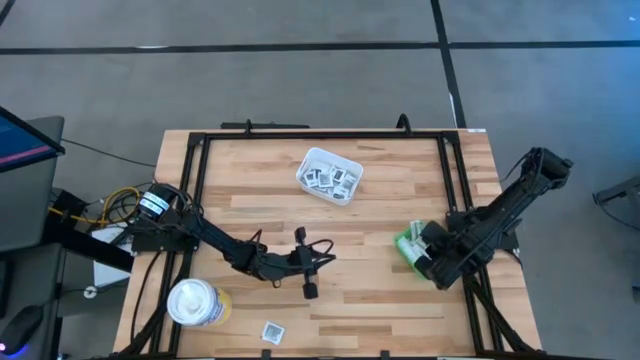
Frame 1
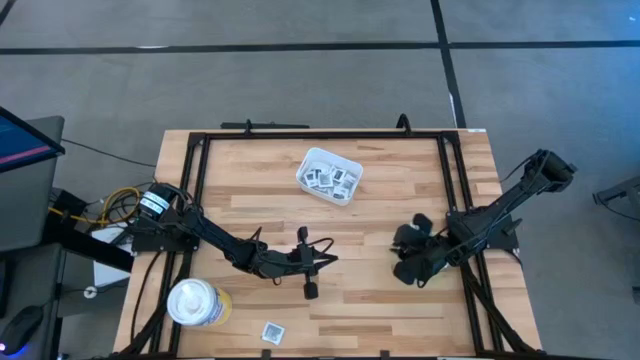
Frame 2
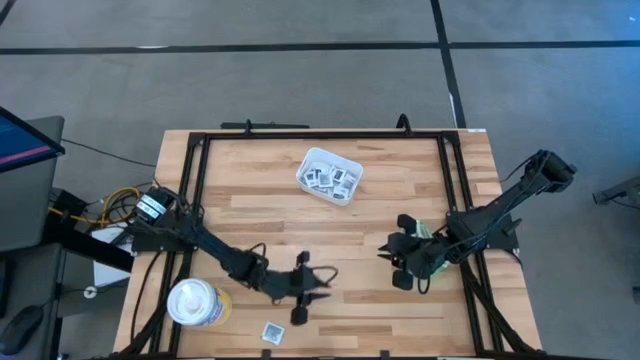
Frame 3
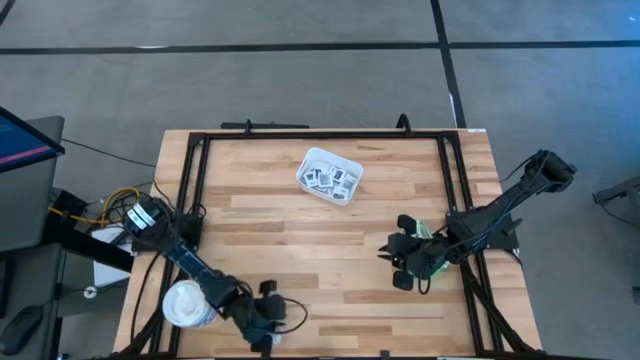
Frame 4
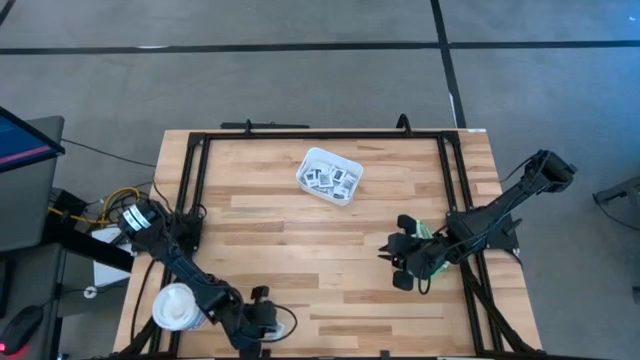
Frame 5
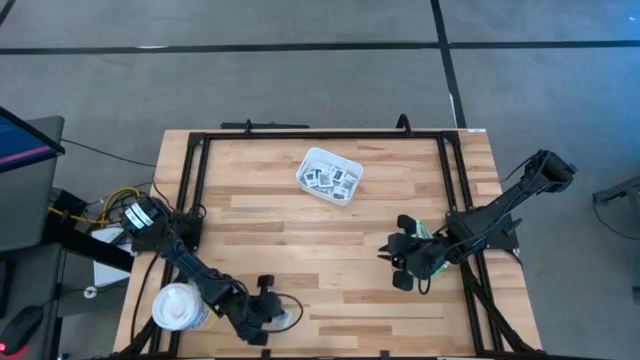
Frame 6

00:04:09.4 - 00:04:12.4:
Task: Pick & Place First Aid Supplies
Put the towelette pack into the white bin

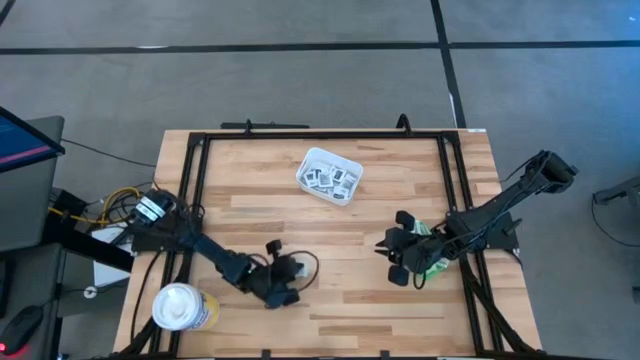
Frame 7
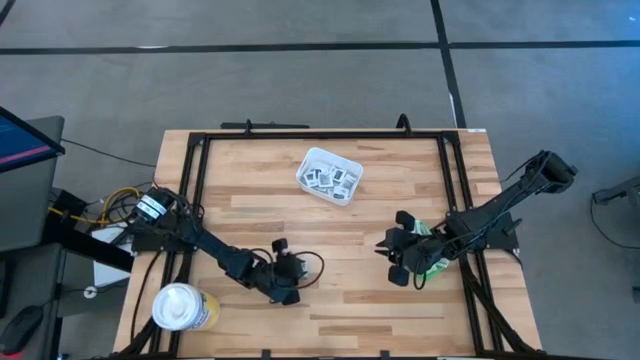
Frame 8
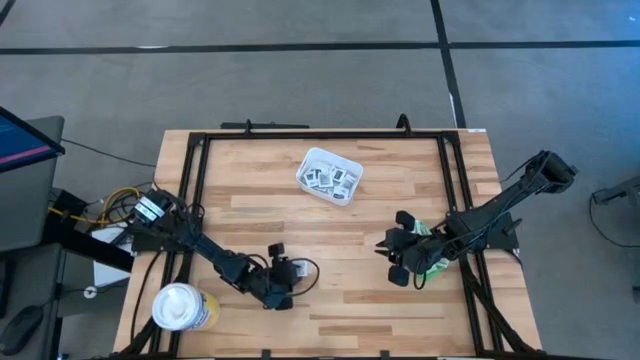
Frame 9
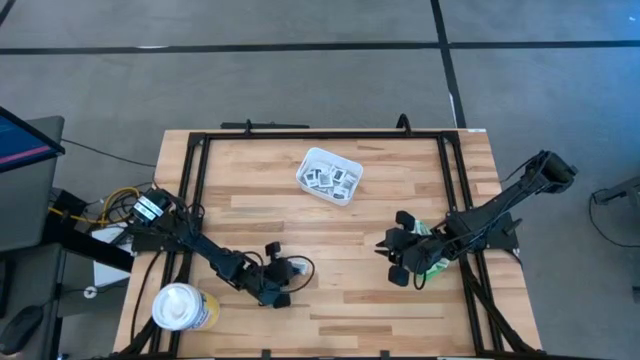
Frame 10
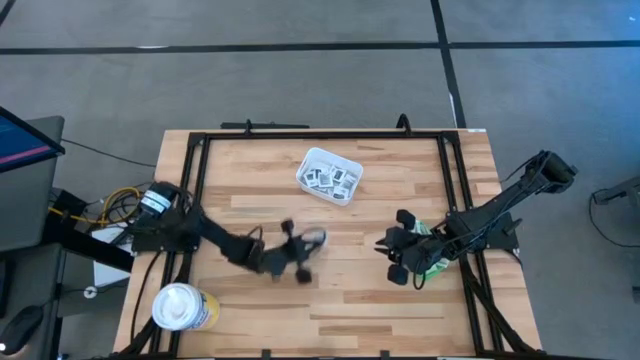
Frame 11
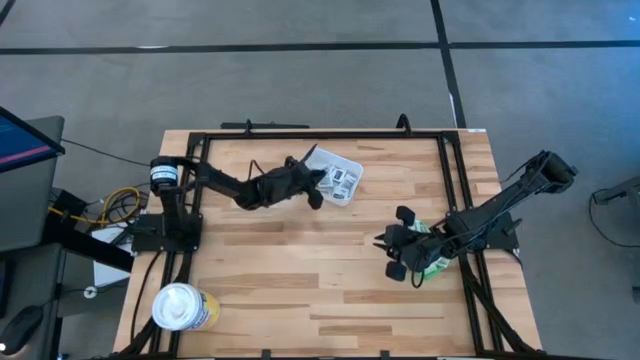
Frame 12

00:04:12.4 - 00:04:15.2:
Put the towelette pack into the white bin

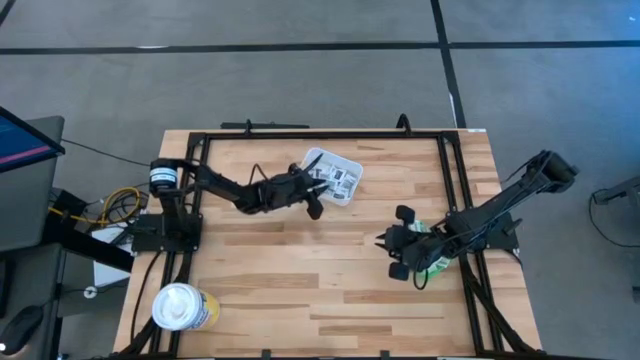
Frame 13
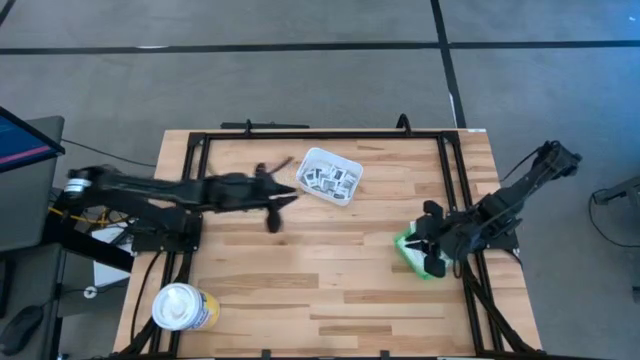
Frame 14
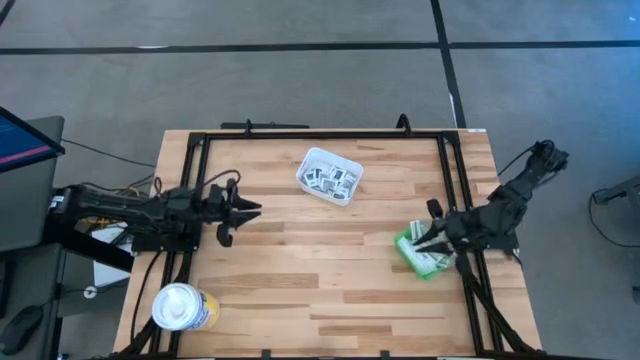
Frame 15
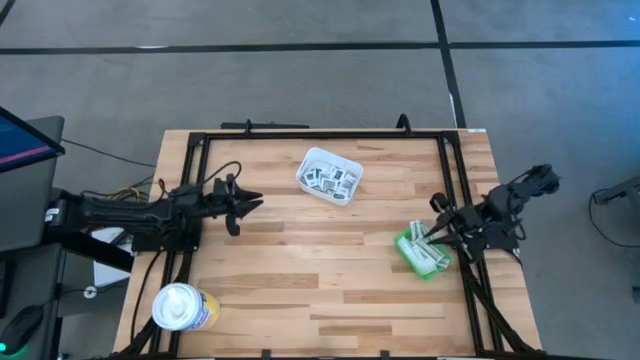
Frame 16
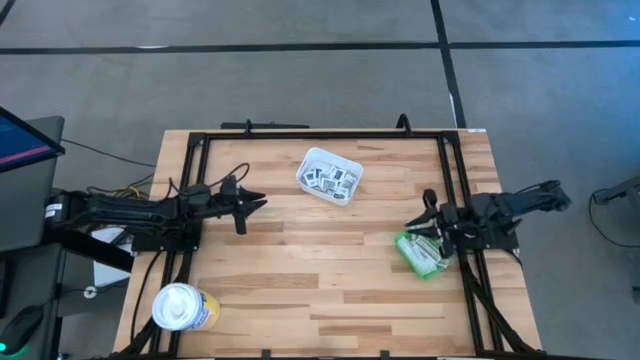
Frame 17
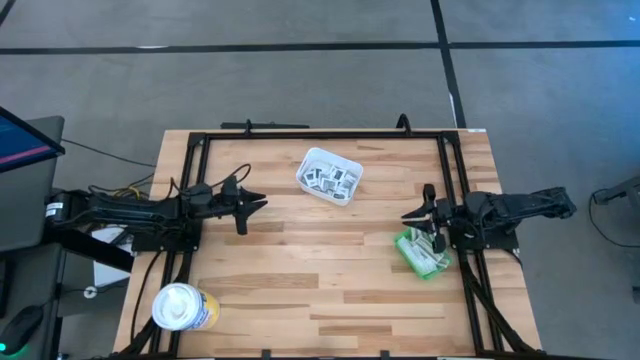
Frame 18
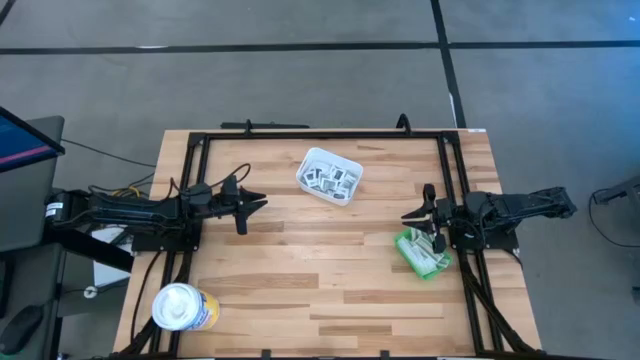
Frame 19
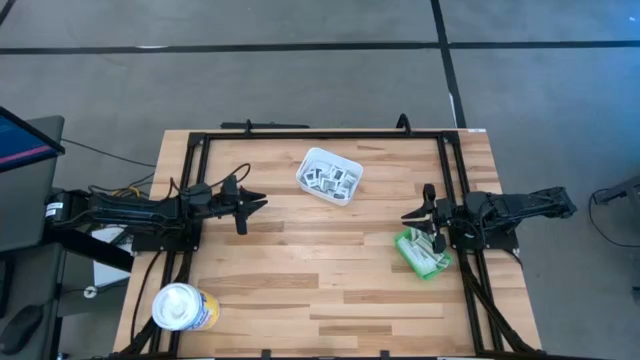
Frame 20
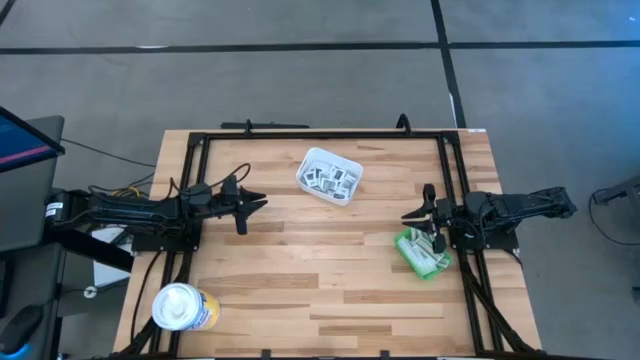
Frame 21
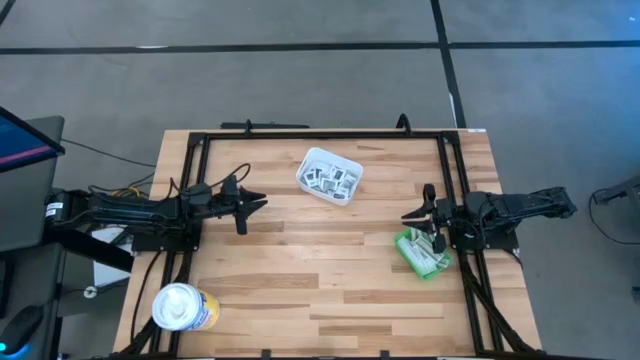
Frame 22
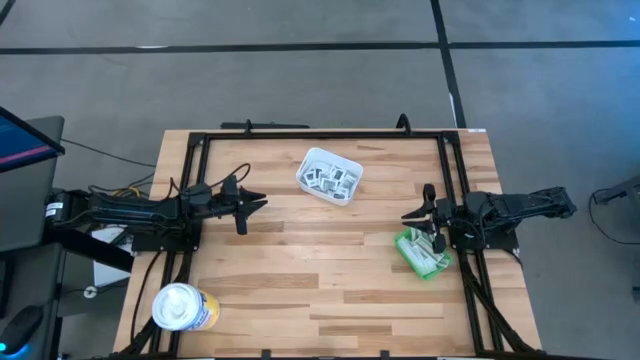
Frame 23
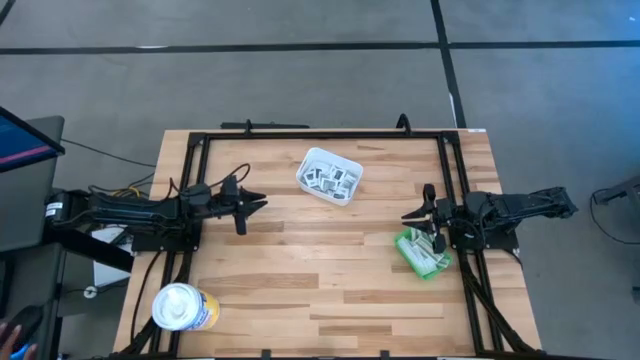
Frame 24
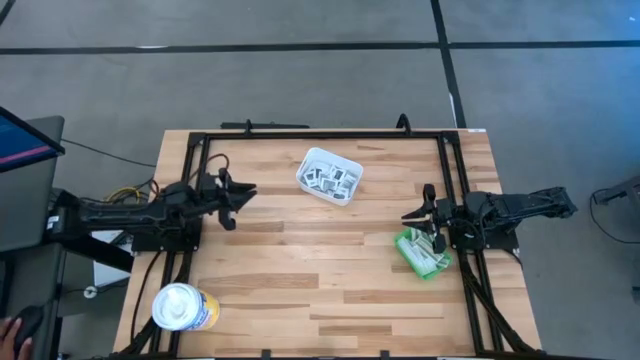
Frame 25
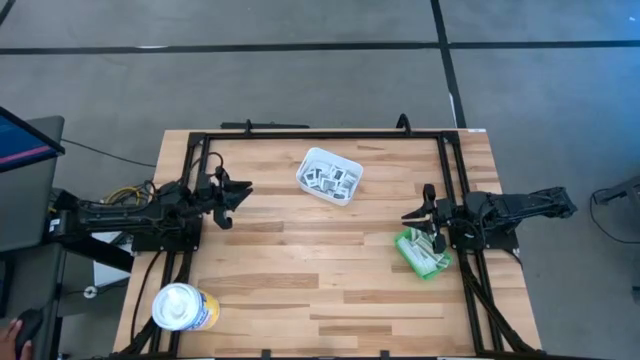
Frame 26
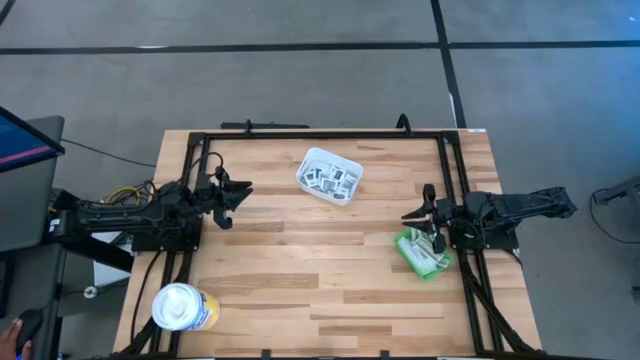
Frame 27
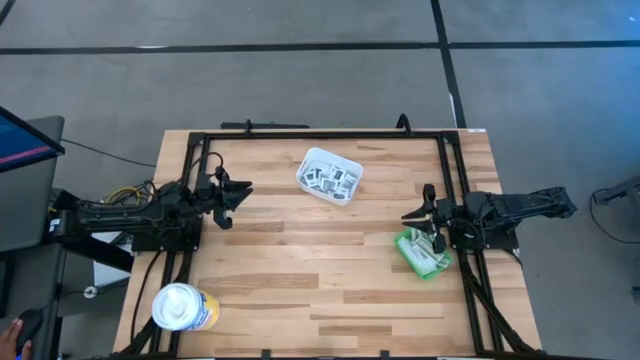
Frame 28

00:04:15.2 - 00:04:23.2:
Return to Home Position

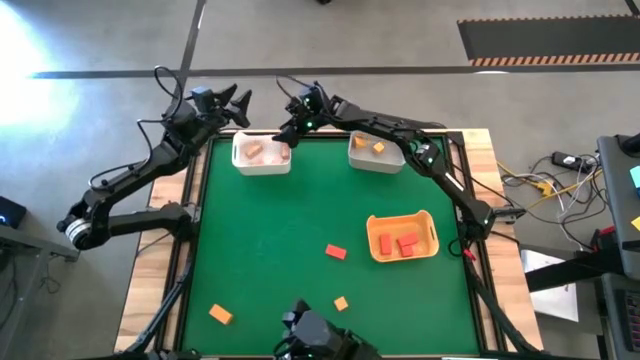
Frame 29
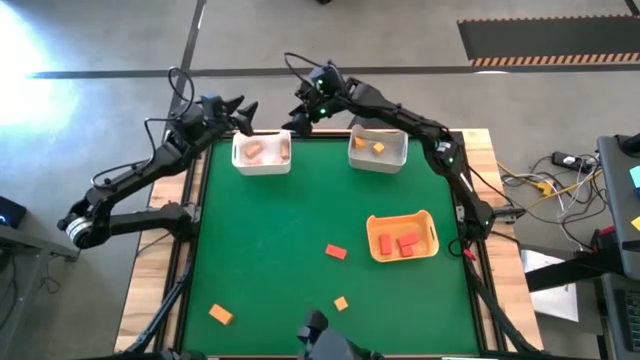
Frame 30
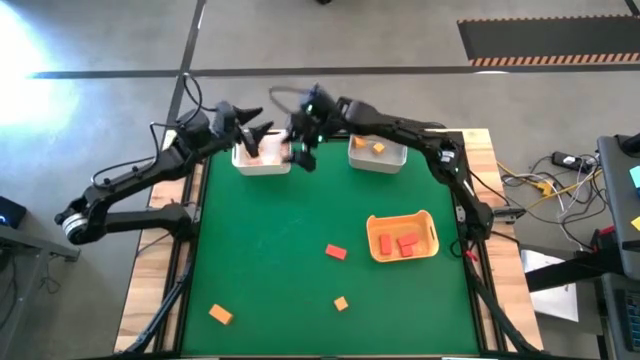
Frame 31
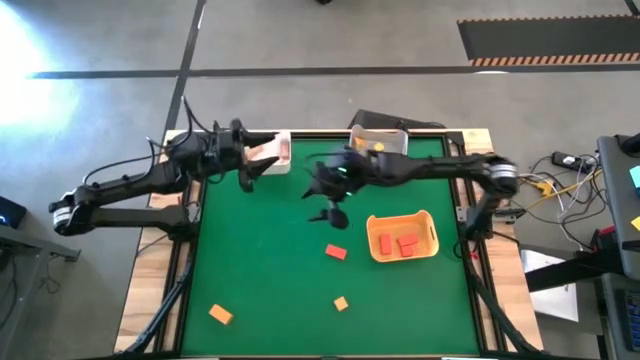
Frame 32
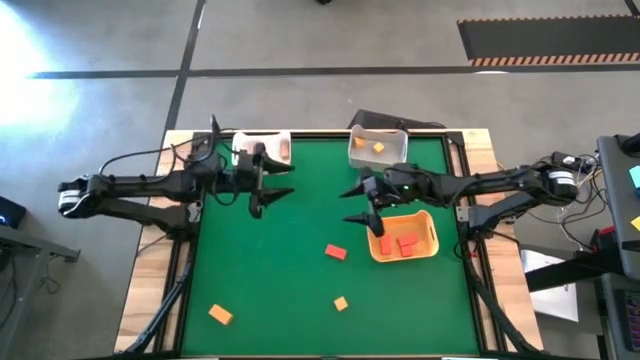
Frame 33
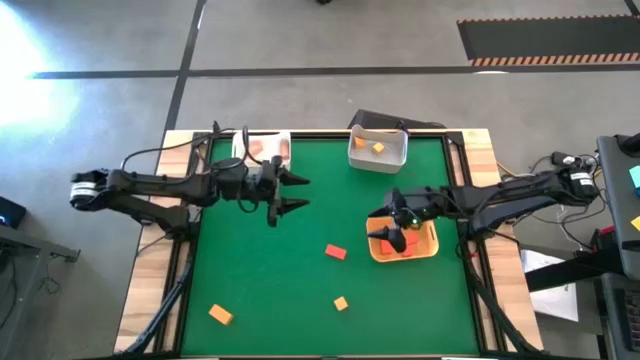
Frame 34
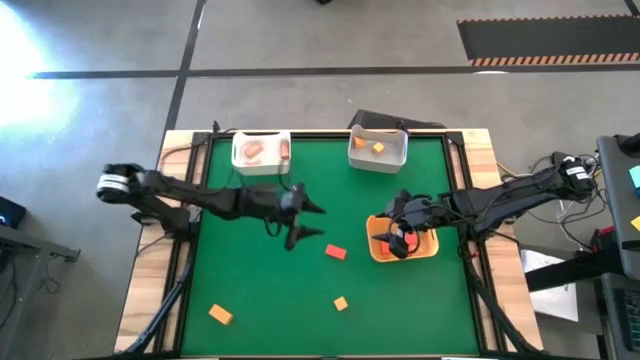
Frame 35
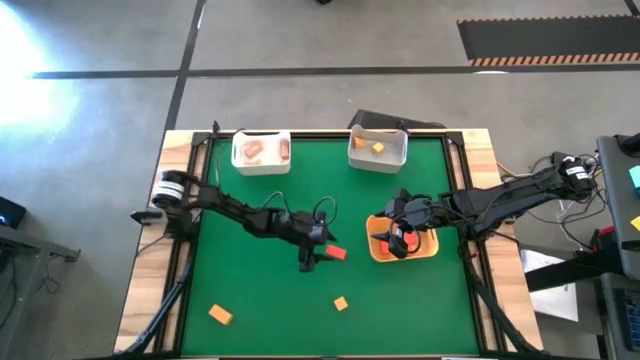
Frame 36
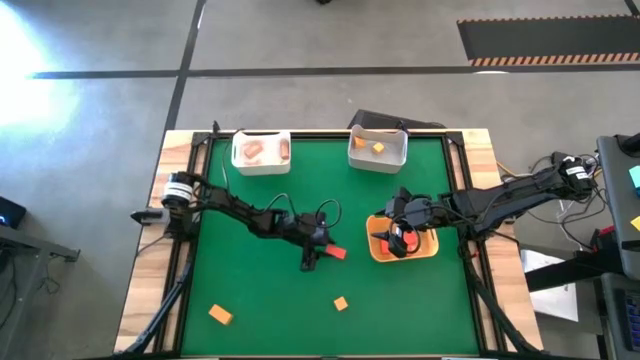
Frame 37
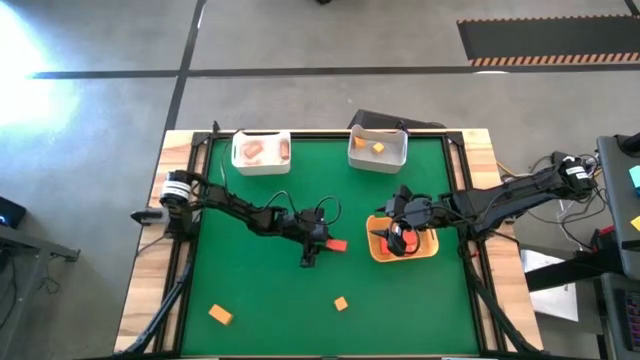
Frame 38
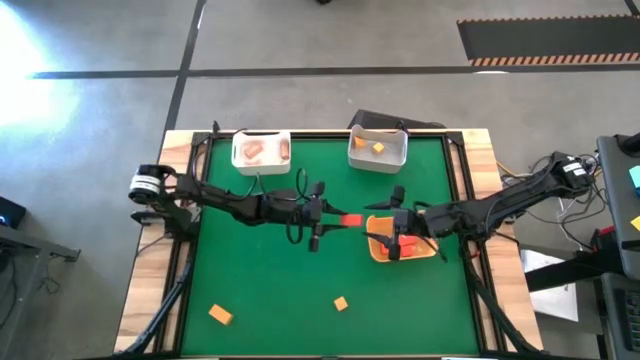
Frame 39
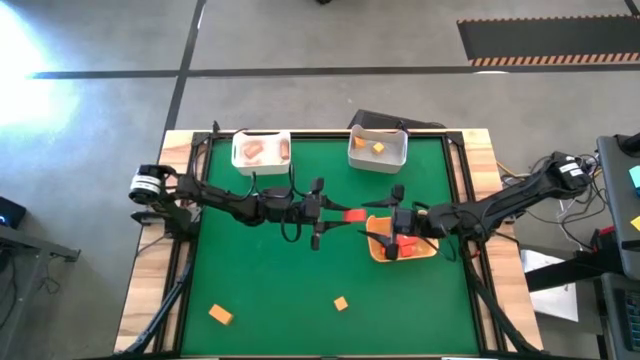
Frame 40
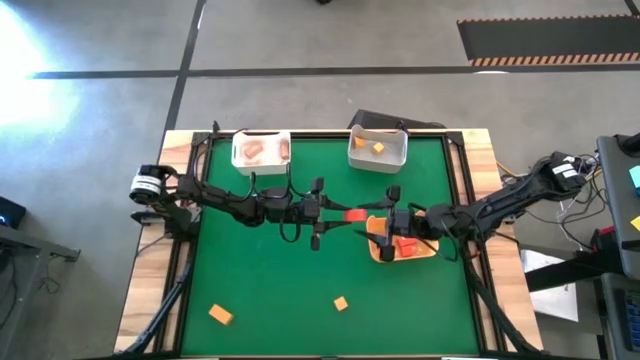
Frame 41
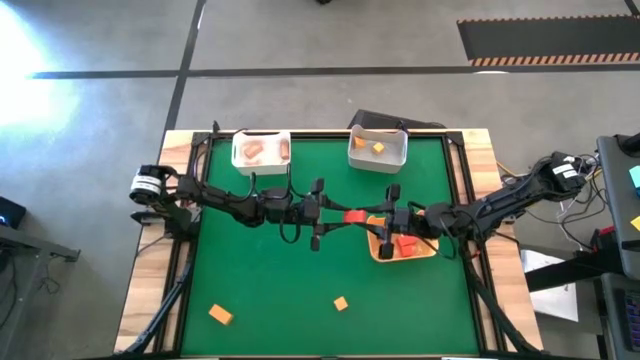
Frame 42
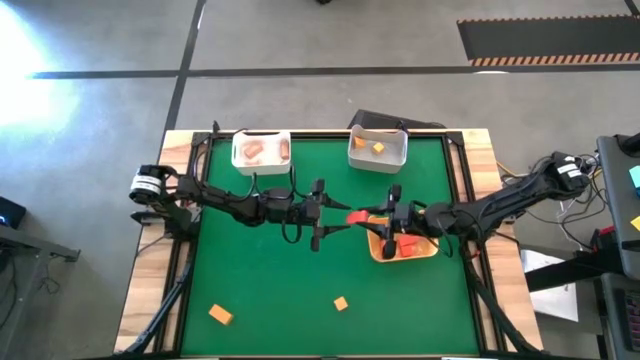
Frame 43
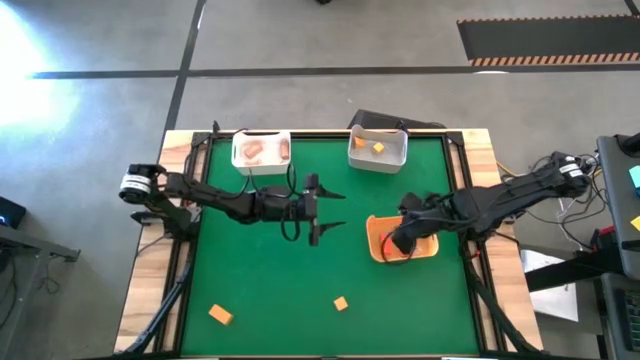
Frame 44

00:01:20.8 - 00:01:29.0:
Task: Sort & place blocks by color
Put the orange block into the yellow bin
